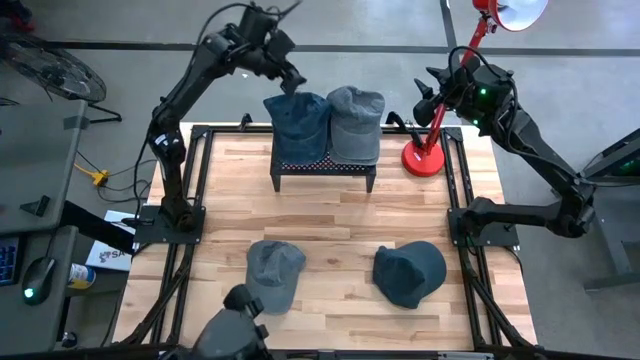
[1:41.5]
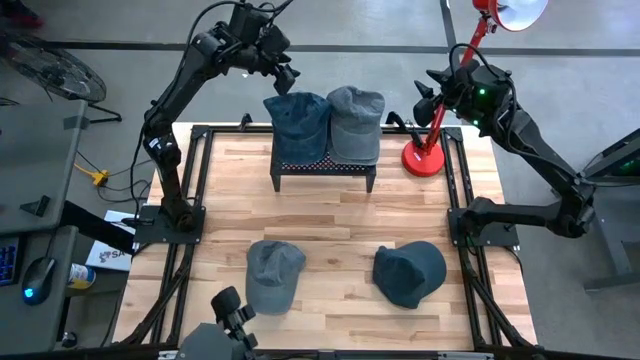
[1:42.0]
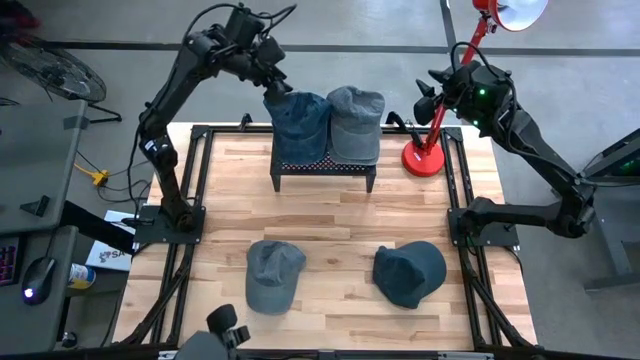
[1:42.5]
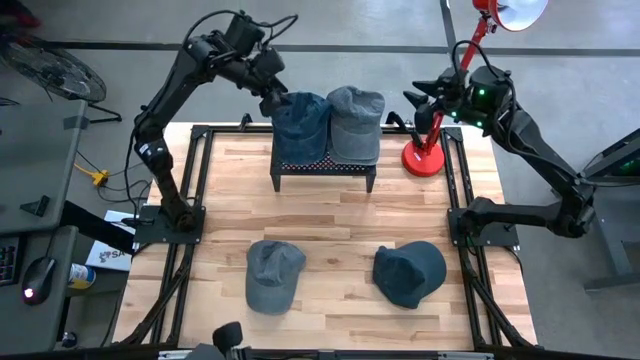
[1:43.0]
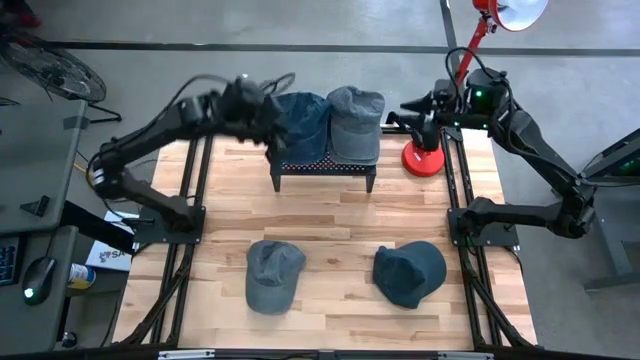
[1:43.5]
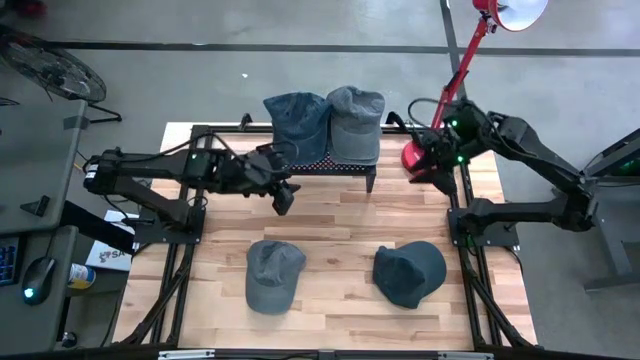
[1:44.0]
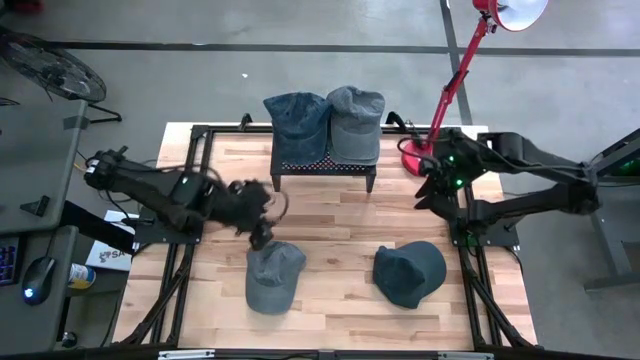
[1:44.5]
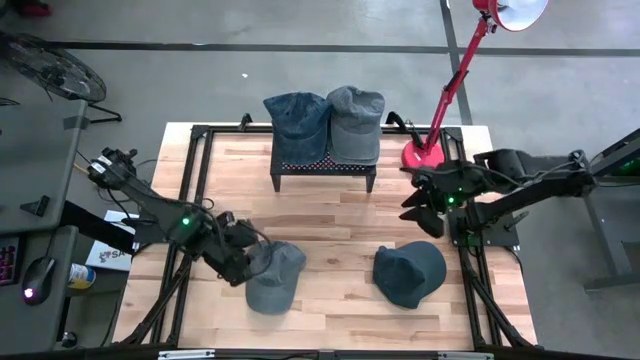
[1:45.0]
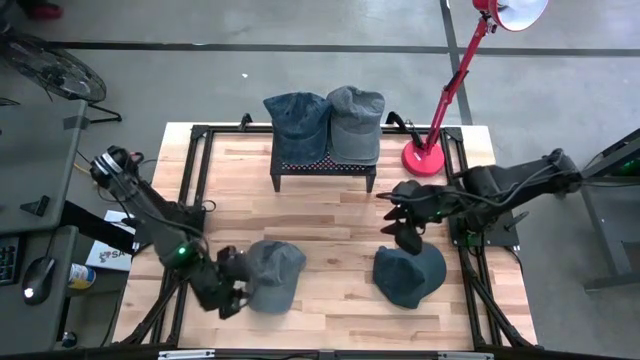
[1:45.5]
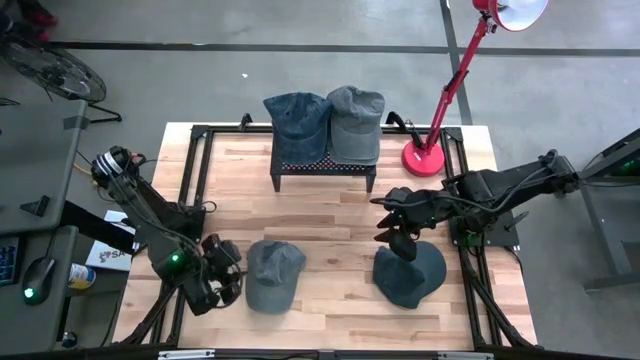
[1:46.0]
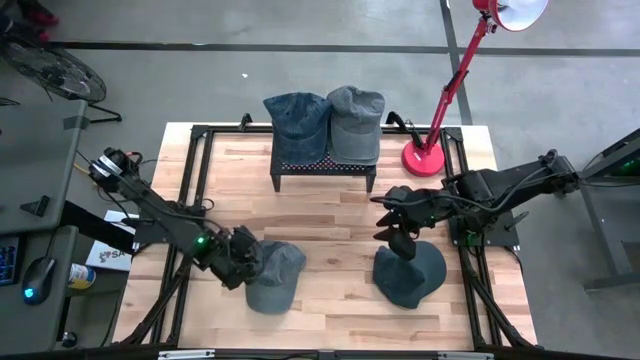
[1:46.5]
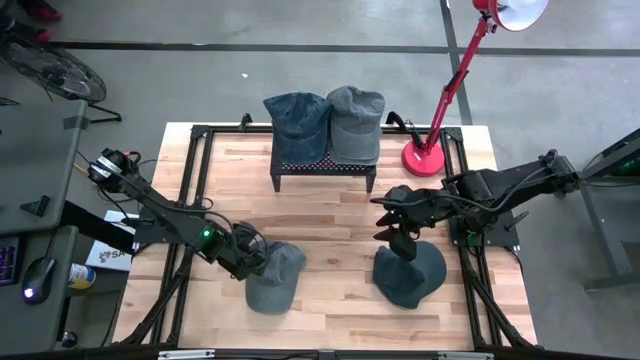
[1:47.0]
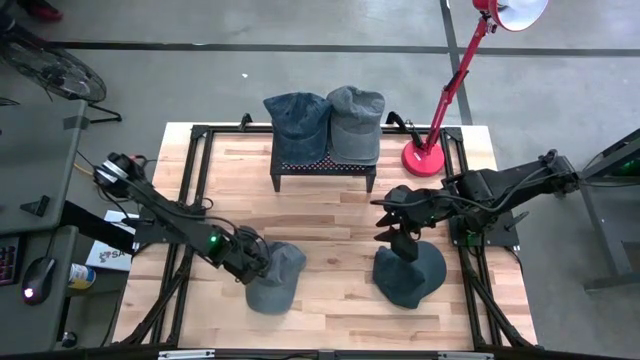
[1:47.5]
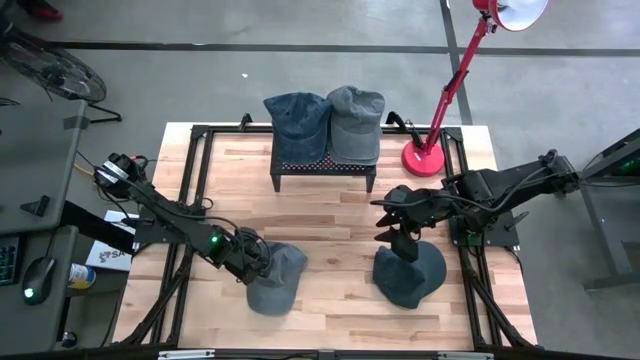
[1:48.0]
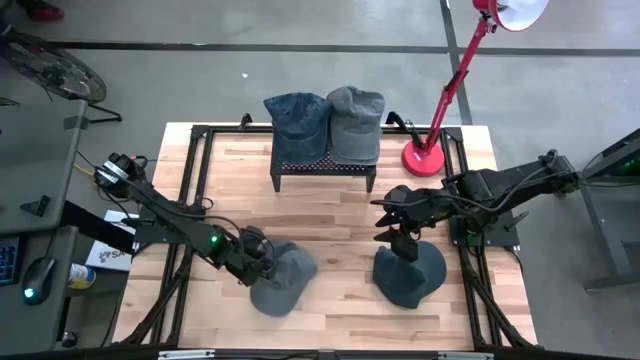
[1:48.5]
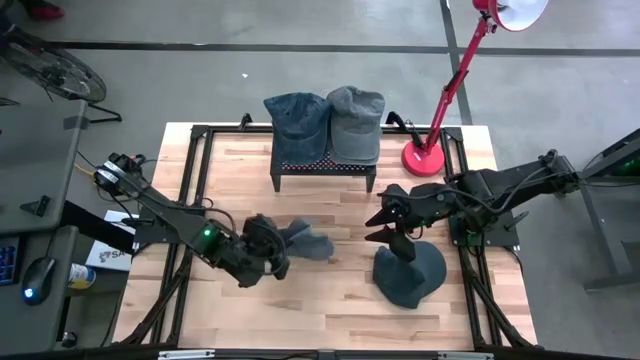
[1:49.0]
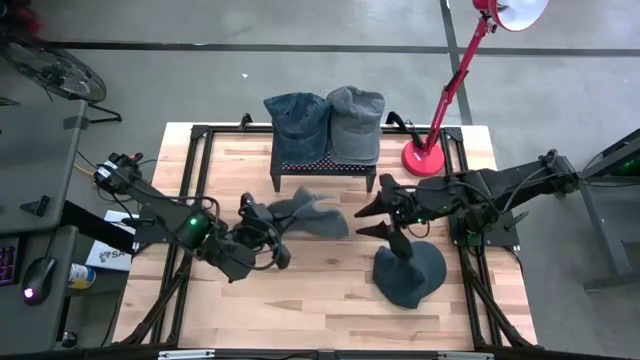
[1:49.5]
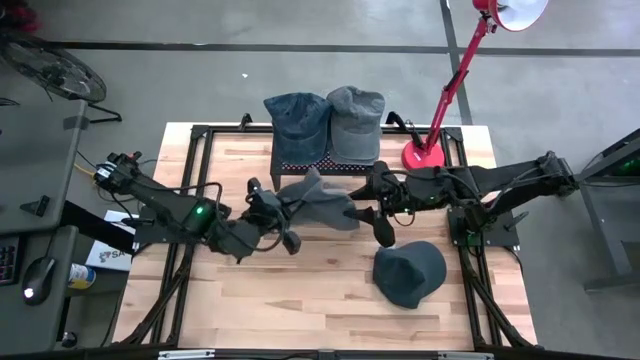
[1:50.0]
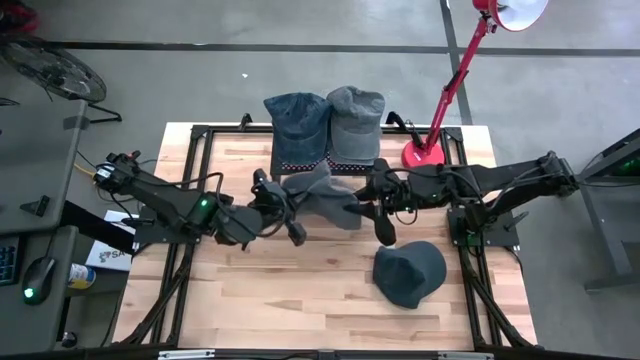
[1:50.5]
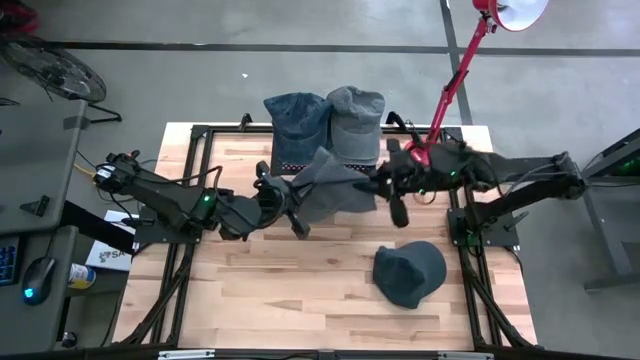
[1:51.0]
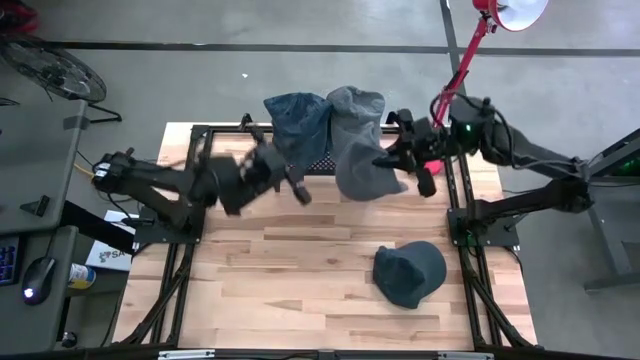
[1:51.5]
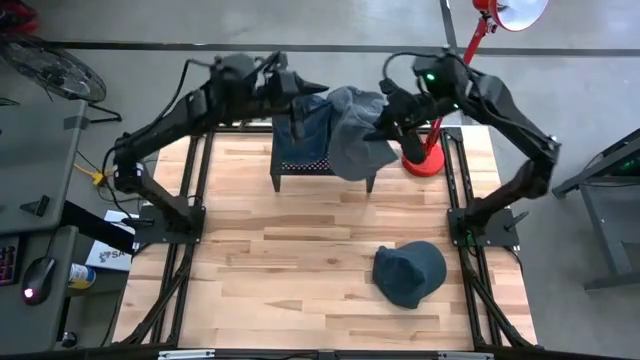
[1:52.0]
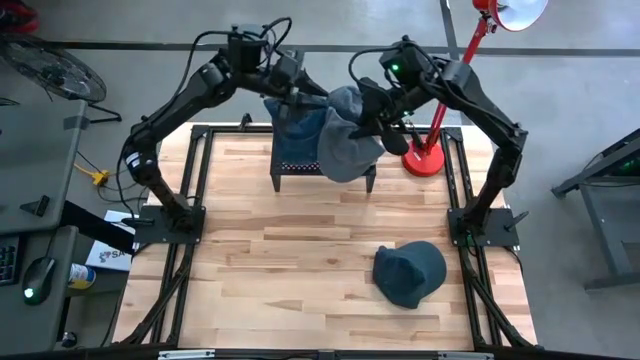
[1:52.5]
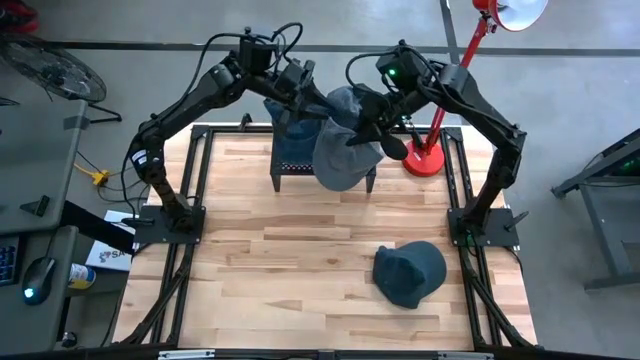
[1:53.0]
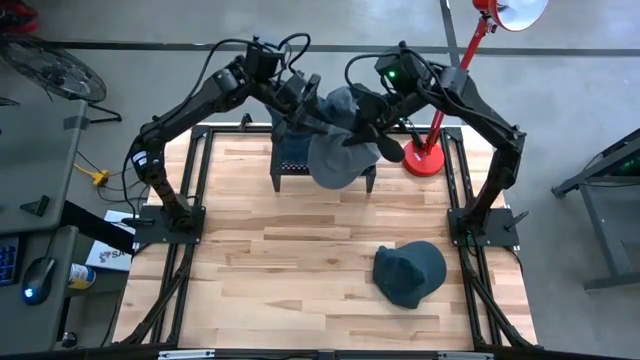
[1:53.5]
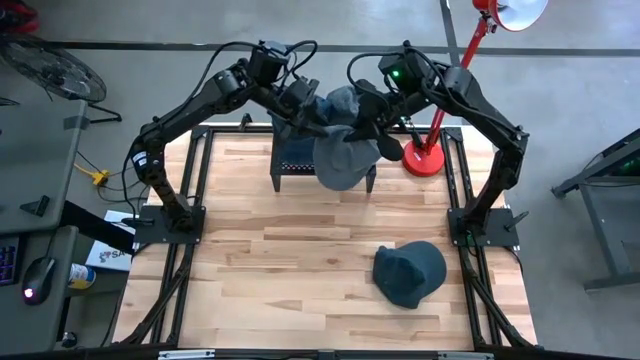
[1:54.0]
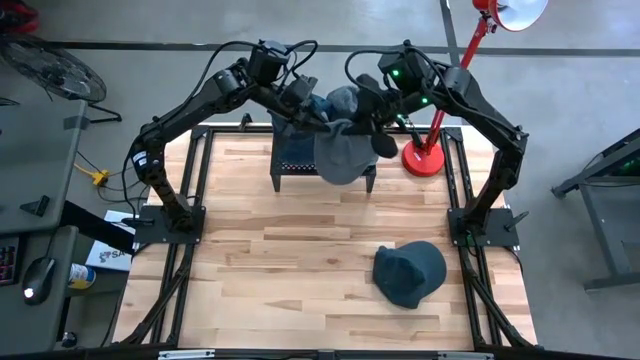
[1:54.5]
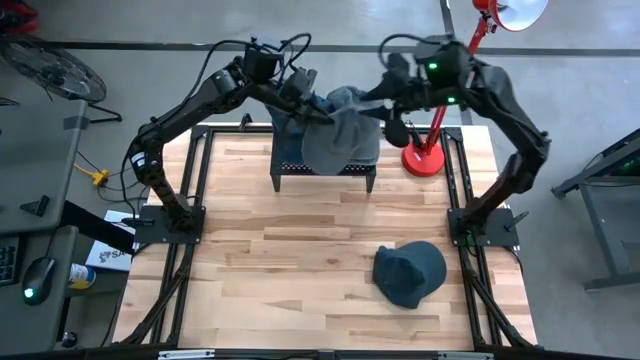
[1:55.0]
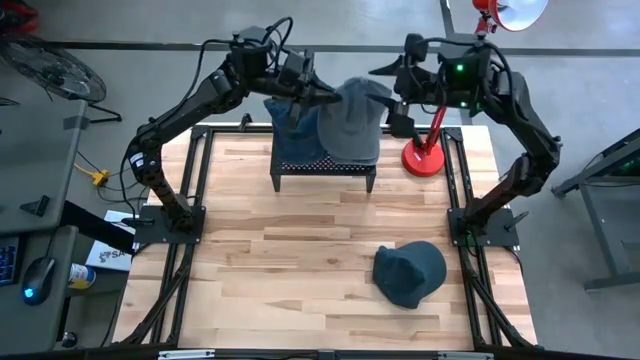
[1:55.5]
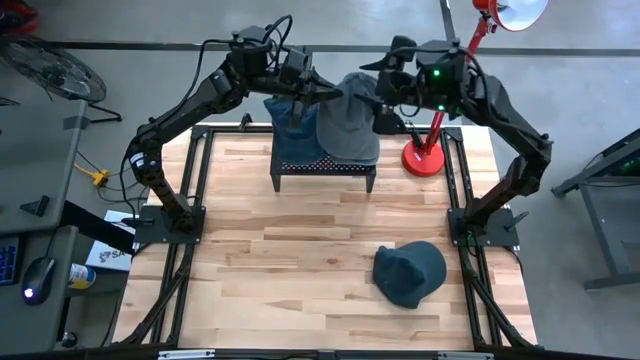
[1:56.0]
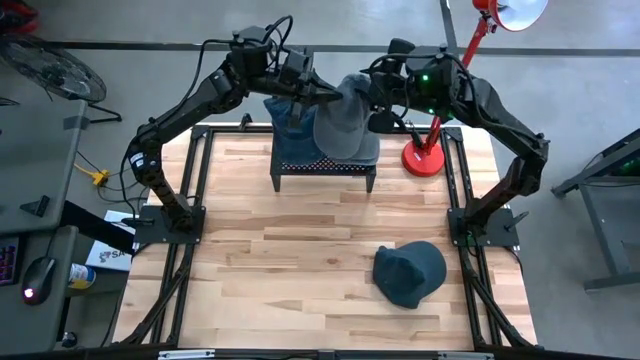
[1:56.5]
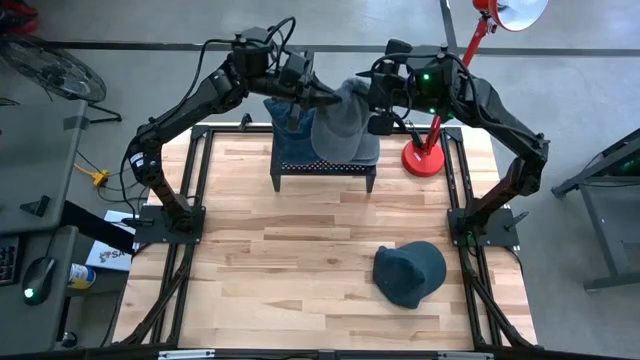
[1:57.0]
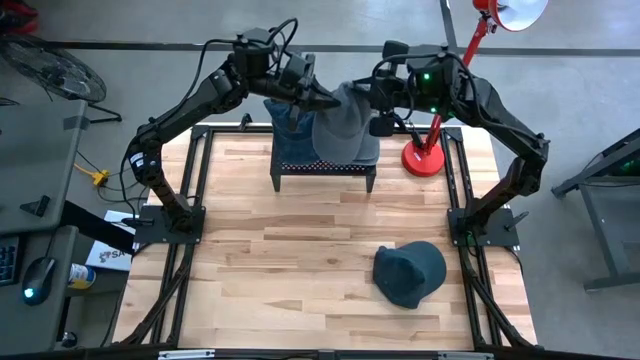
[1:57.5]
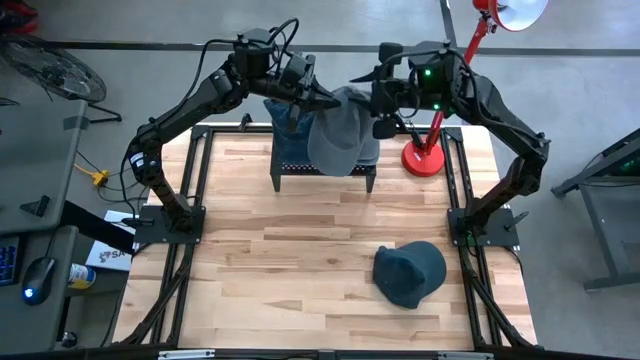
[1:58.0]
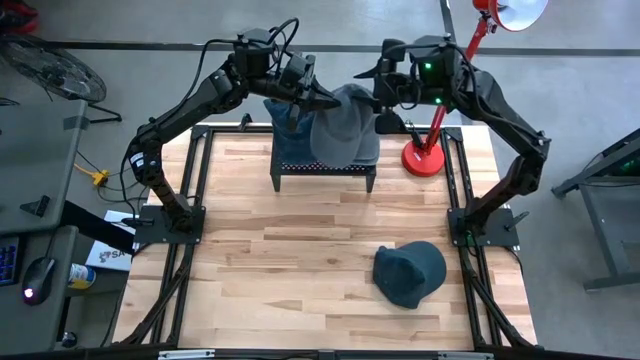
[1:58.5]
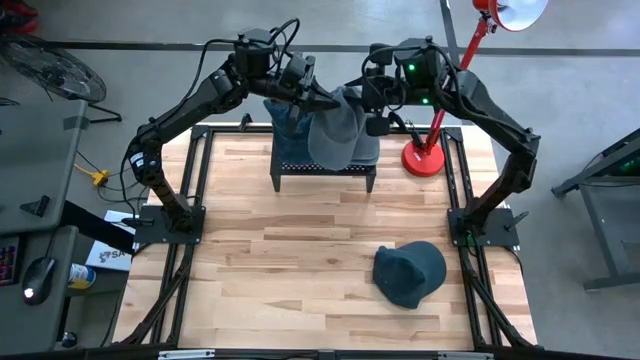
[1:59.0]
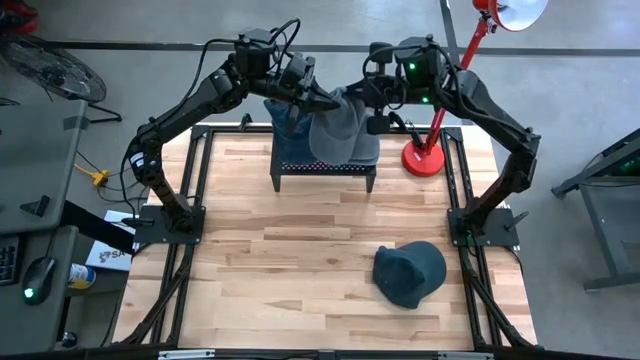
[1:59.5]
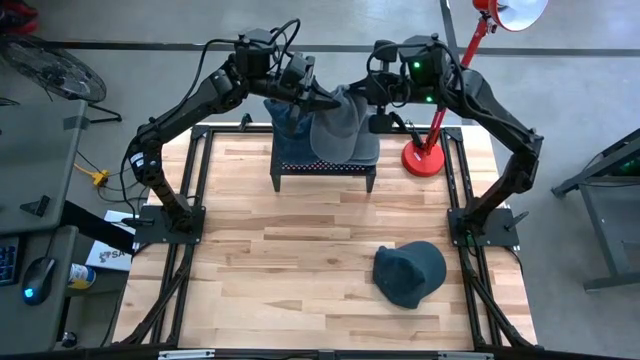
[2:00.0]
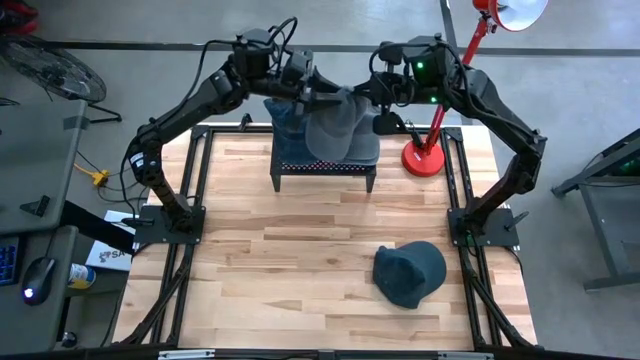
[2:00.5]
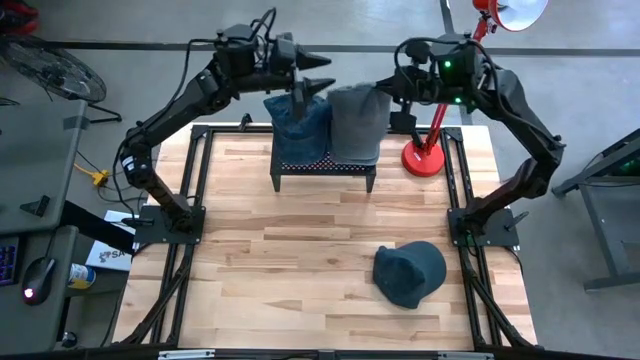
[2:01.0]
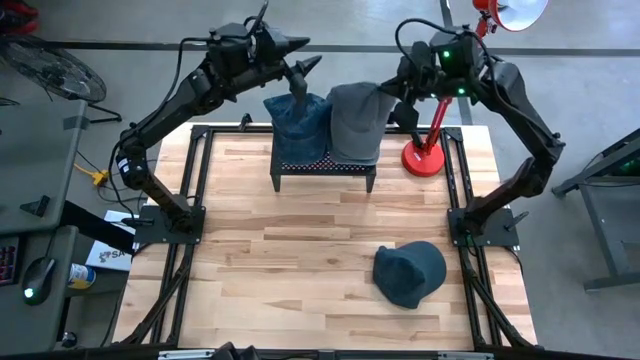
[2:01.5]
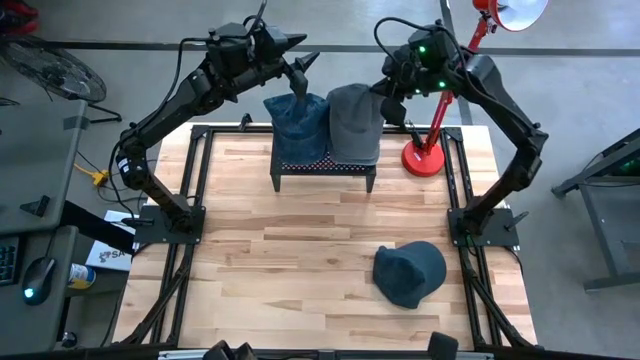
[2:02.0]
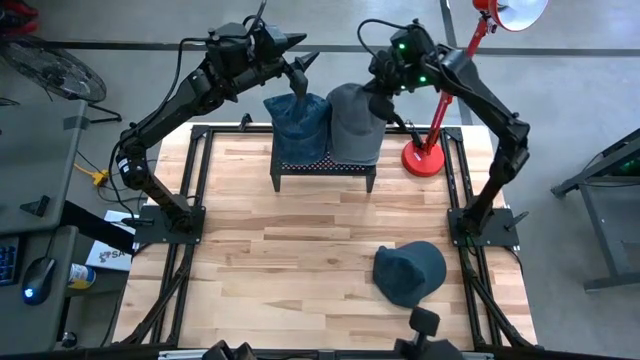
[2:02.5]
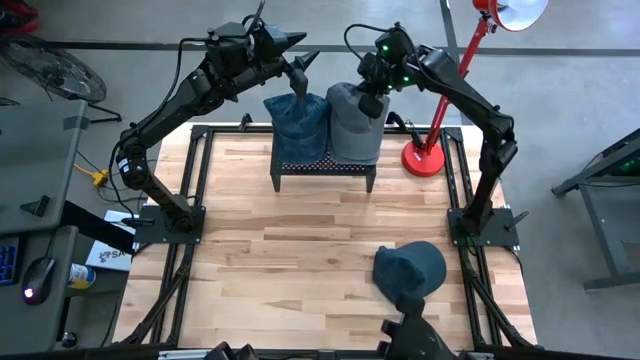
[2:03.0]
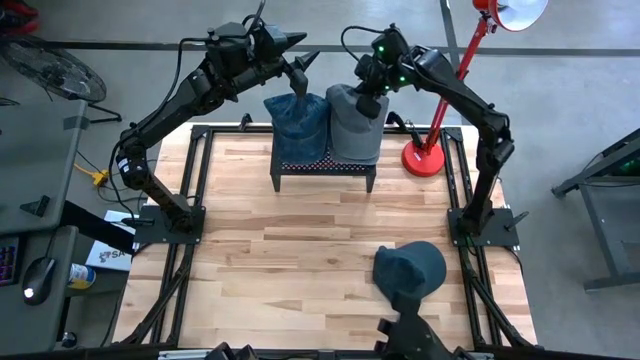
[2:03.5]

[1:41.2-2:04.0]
Task: Pick & Place hat
Stack the gray cap on the gray cap on the shelf
